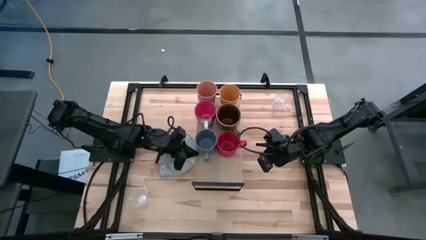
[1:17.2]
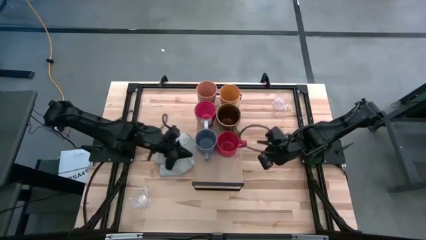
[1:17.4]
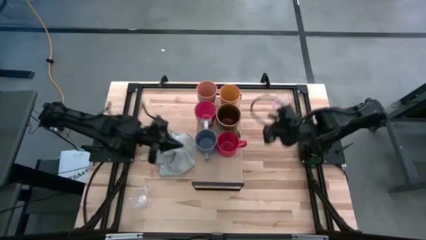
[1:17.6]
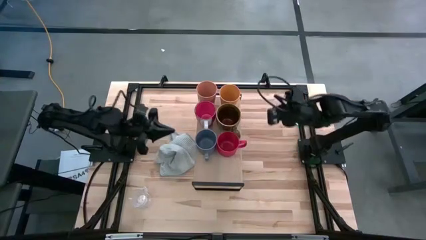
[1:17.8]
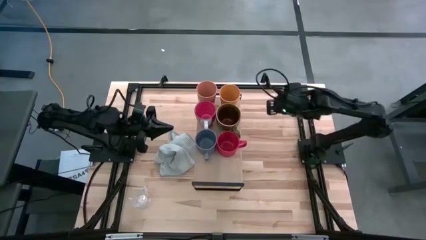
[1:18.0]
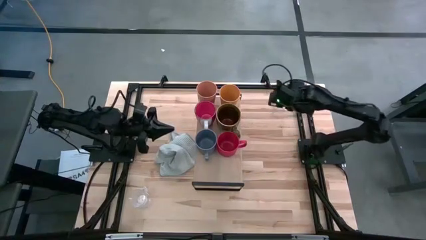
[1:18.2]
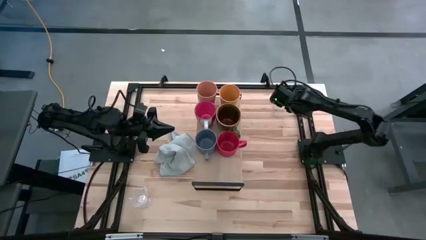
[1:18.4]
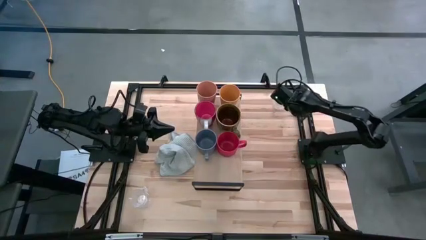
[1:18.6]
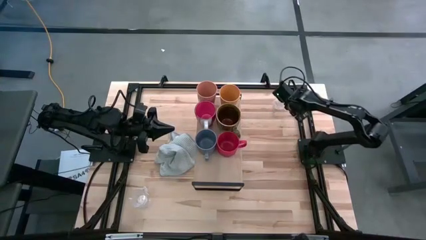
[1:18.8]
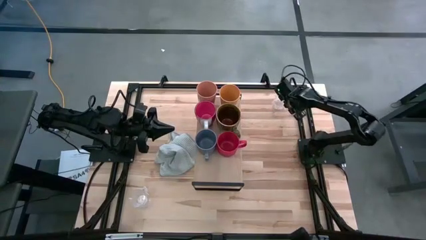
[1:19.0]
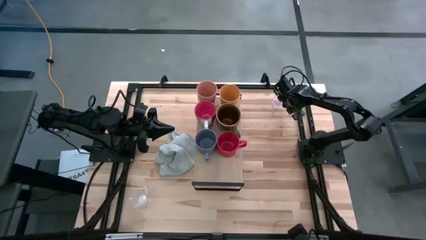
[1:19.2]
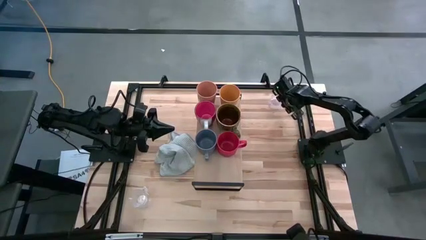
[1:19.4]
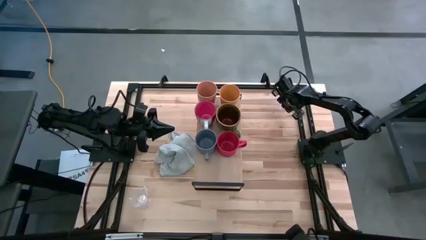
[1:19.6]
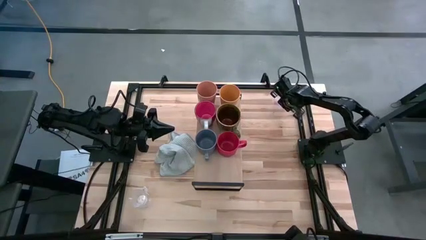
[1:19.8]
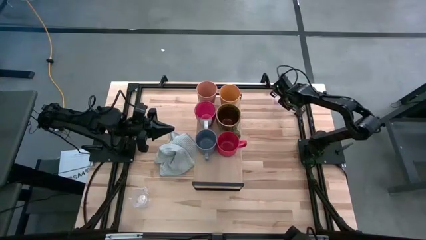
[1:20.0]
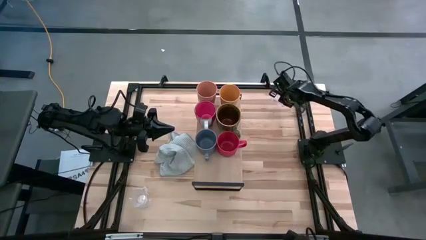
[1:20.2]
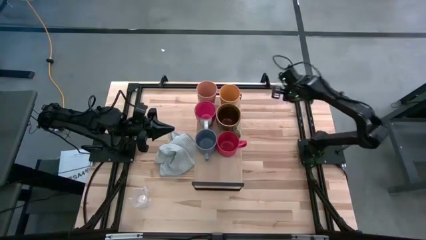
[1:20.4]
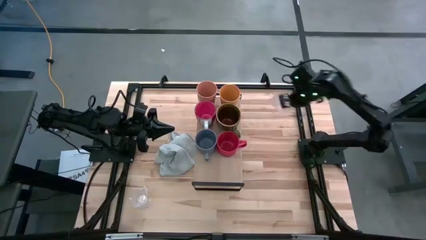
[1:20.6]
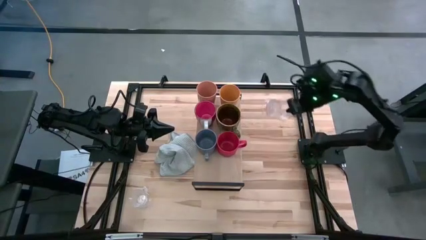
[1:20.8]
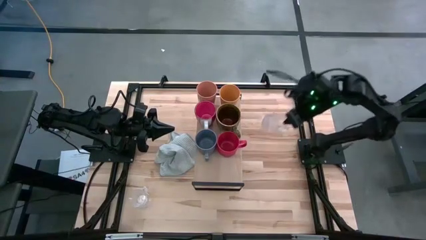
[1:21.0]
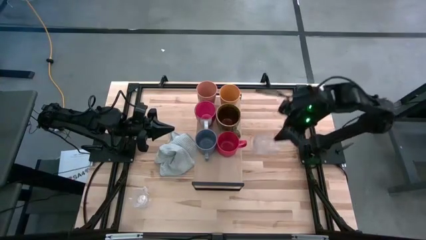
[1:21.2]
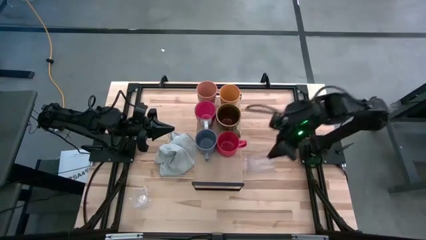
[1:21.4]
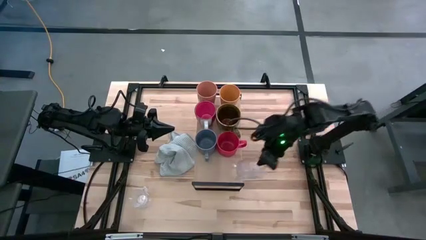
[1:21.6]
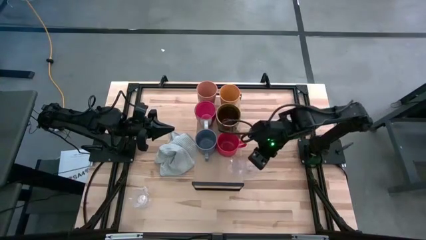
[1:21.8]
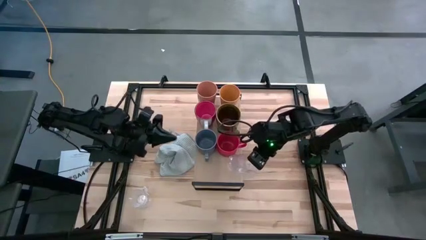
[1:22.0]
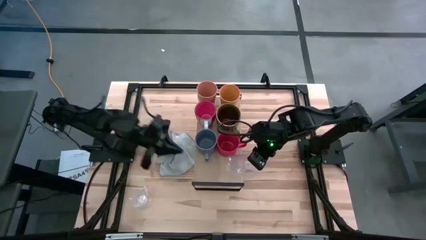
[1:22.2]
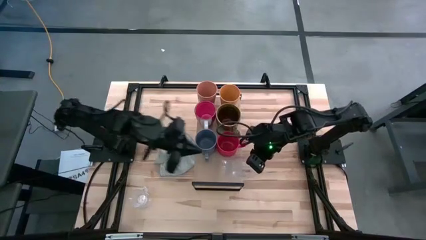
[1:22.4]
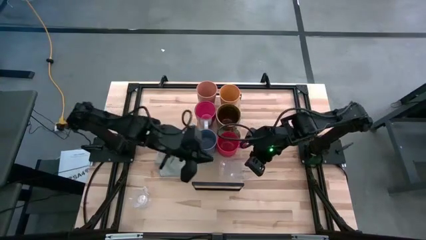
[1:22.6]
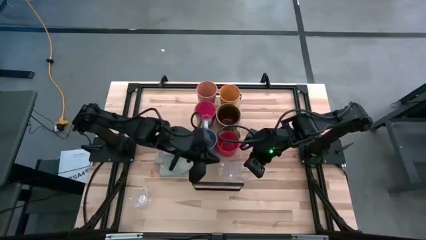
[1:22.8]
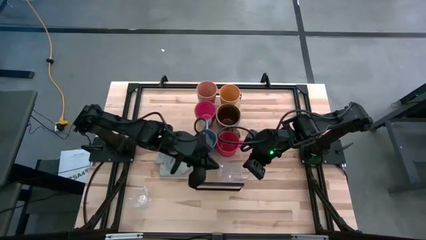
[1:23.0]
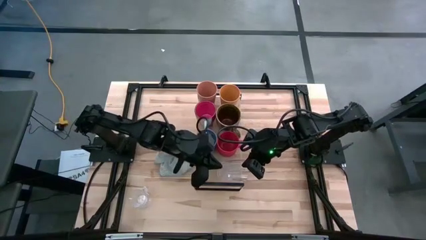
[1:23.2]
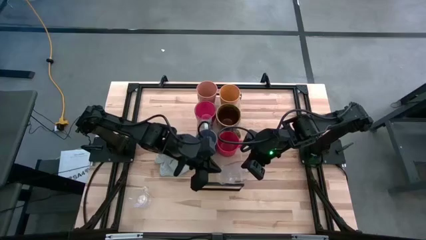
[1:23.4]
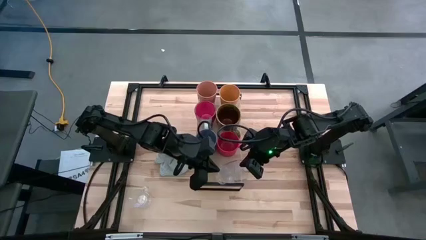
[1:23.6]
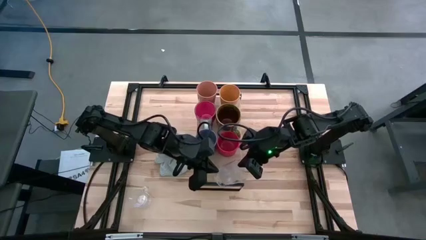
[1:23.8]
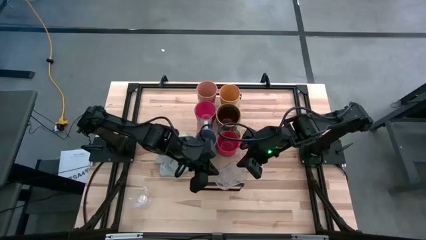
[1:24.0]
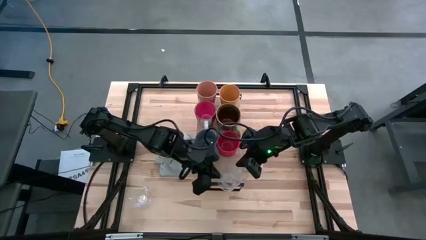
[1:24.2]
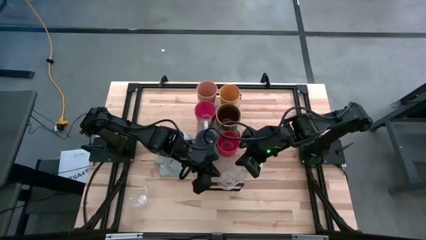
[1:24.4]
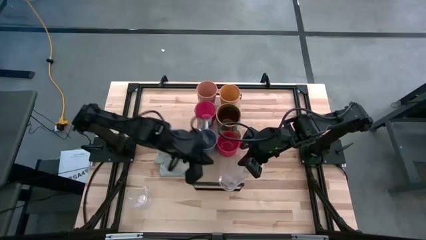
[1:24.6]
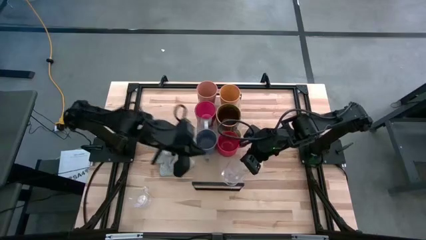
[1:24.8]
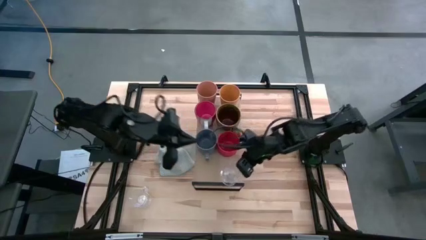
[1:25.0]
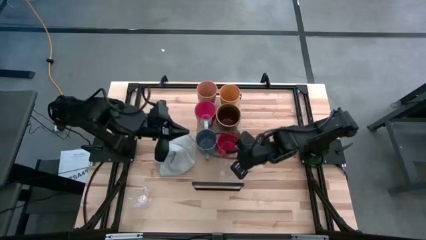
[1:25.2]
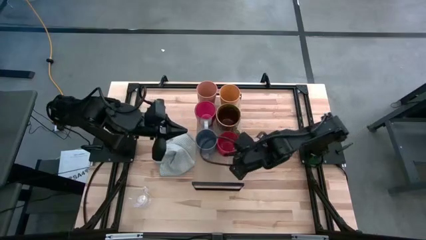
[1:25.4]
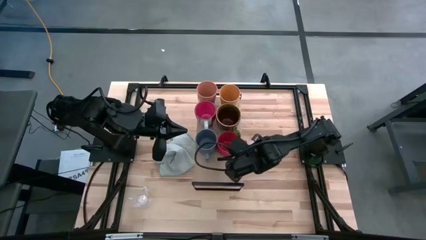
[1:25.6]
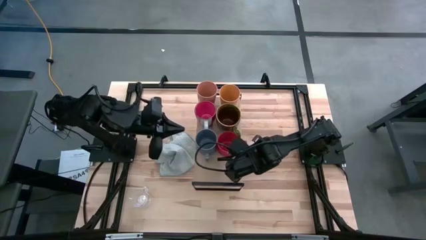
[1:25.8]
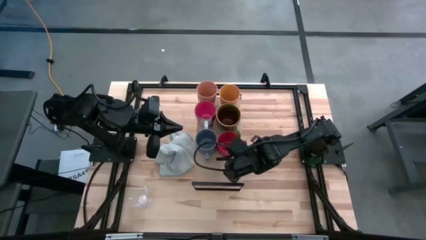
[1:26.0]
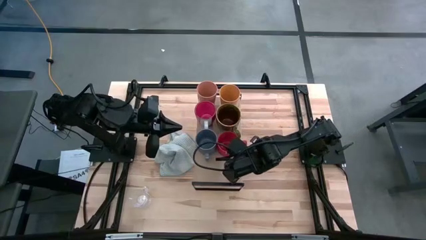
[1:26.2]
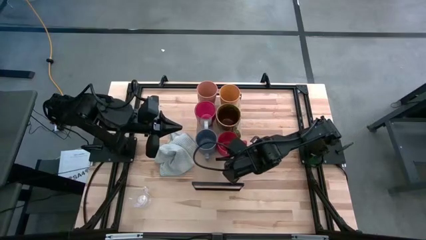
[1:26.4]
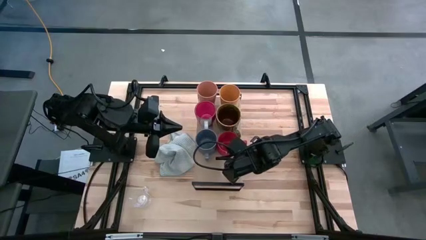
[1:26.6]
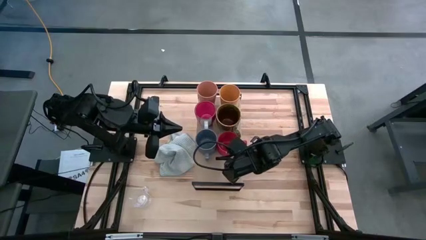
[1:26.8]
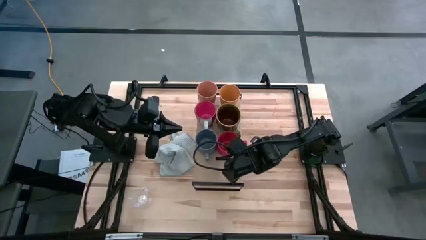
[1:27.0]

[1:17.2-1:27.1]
Task: Stack small to large cups/mugs on shelf
Put the top transparent mug on the shelf

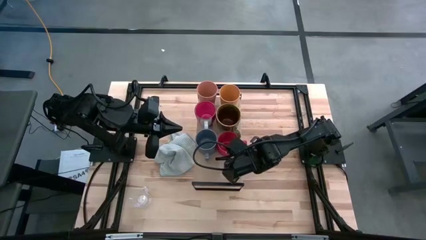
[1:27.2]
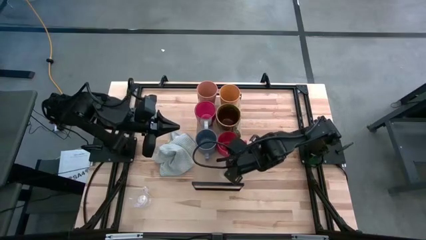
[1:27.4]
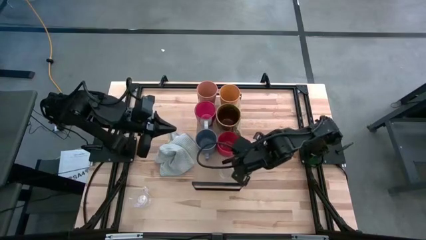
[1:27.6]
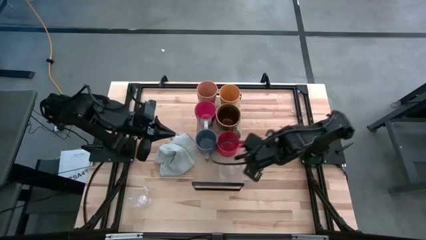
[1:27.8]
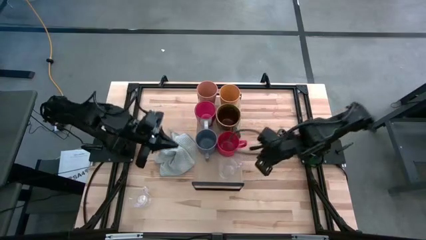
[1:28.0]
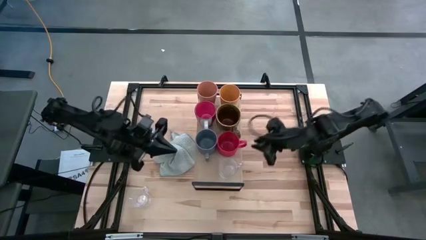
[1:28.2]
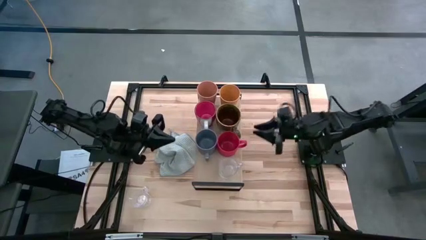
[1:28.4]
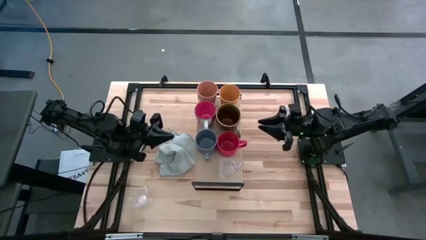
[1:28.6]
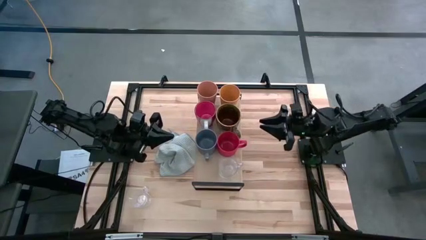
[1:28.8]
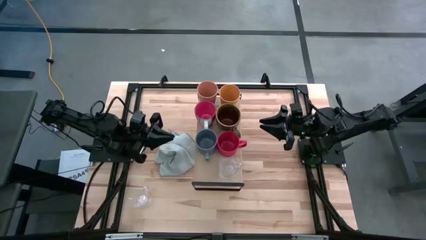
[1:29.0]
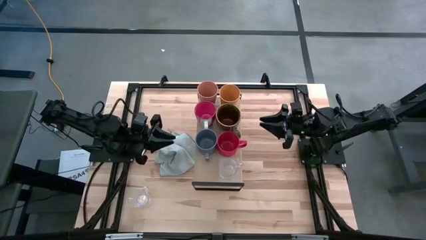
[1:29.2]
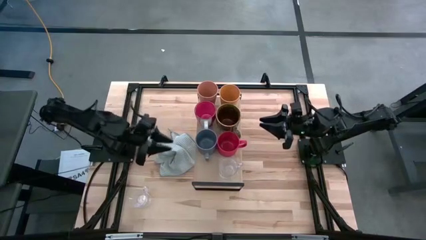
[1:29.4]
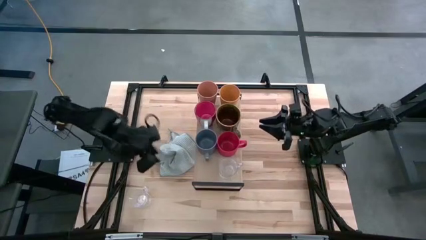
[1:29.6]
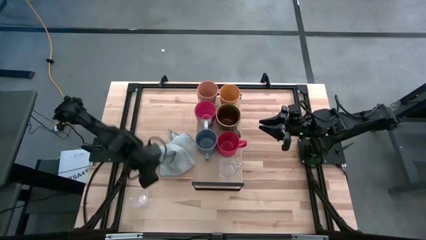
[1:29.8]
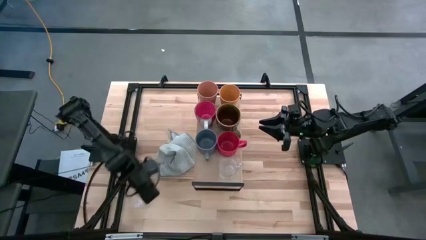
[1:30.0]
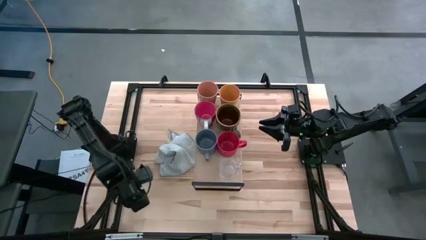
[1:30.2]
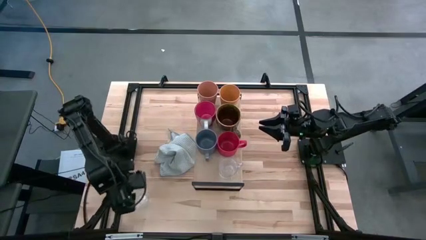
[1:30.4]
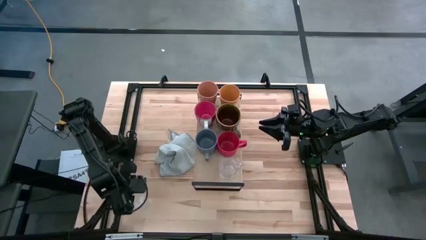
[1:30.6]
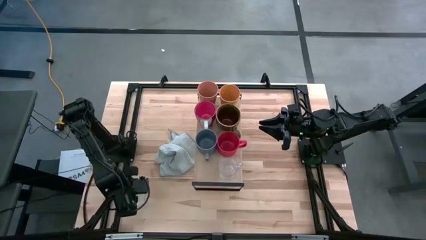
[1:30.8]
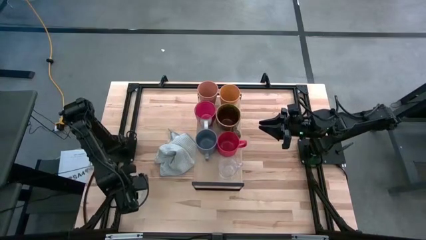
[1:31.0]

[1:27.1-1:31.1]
Put the transparent mug aligned with the other transparent mug on the shelf

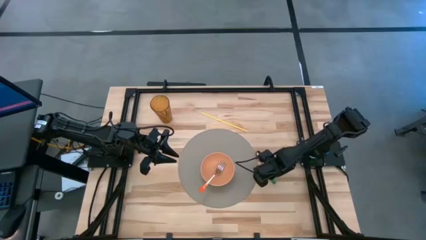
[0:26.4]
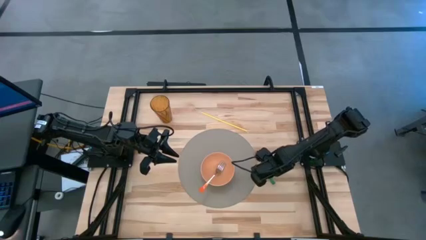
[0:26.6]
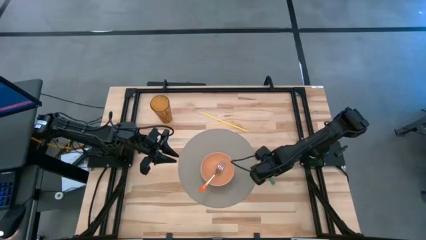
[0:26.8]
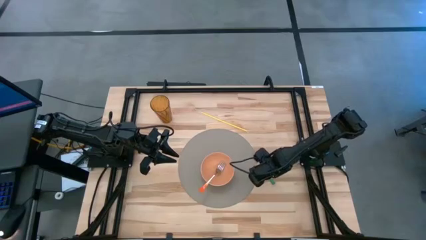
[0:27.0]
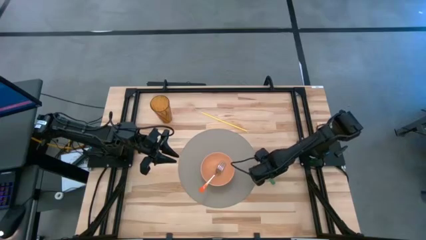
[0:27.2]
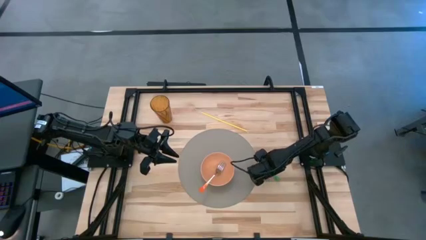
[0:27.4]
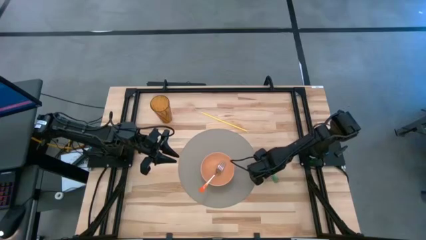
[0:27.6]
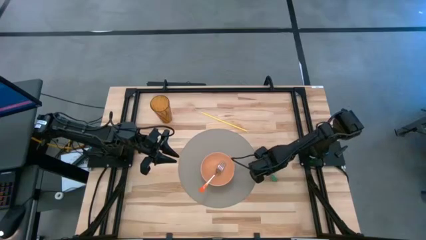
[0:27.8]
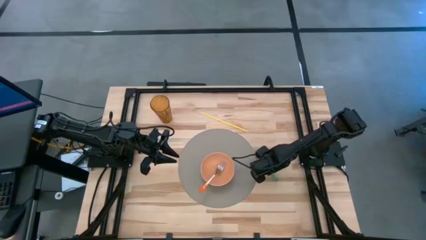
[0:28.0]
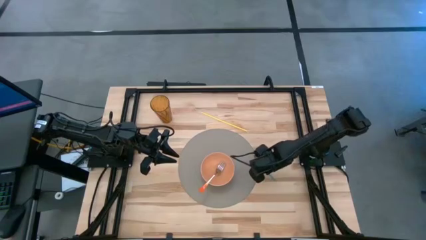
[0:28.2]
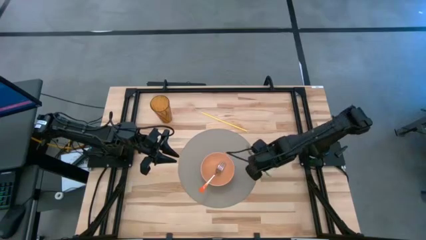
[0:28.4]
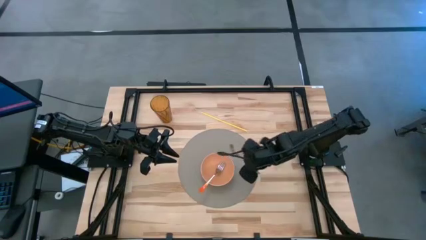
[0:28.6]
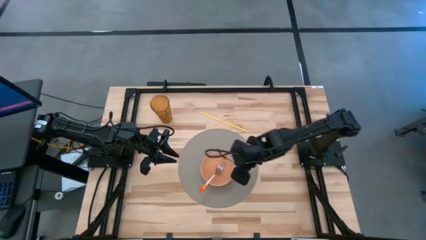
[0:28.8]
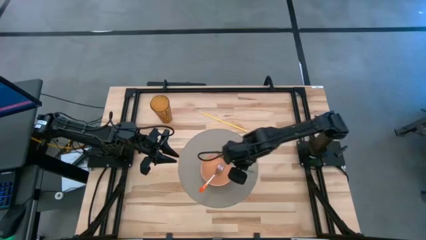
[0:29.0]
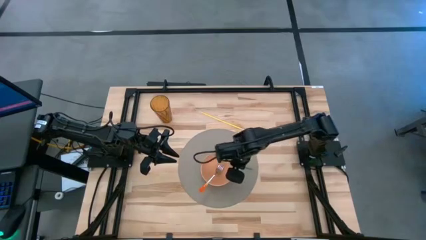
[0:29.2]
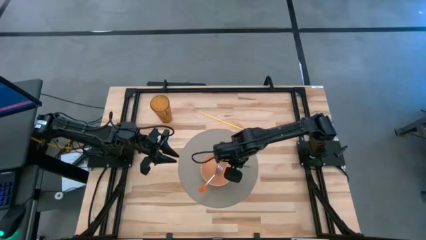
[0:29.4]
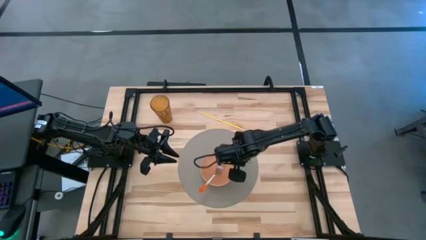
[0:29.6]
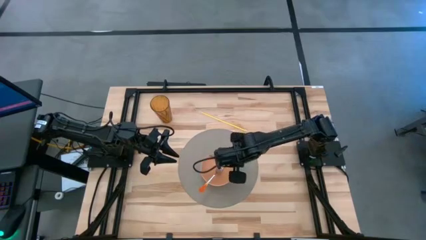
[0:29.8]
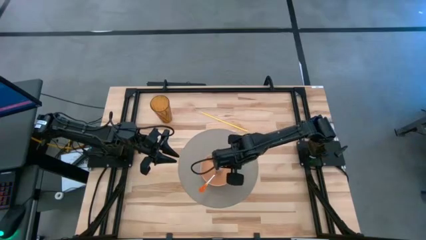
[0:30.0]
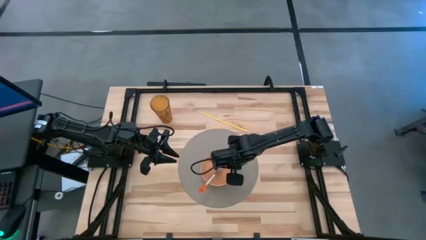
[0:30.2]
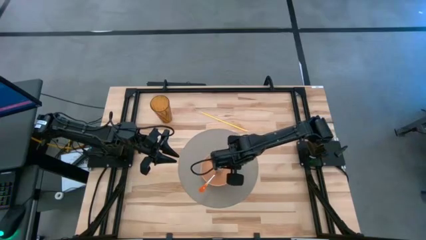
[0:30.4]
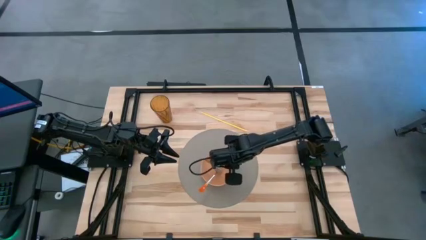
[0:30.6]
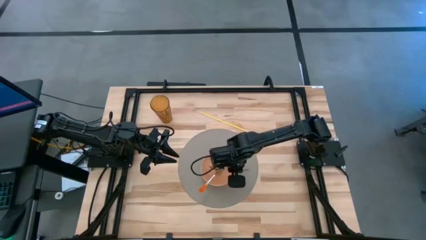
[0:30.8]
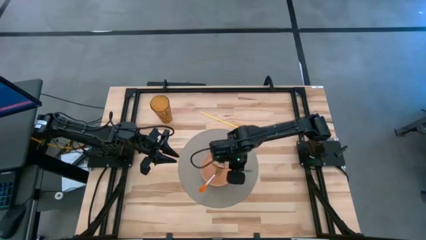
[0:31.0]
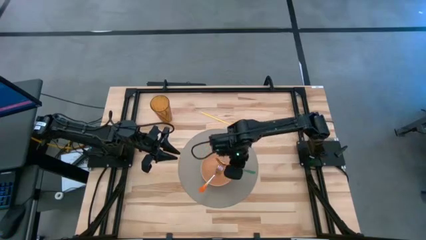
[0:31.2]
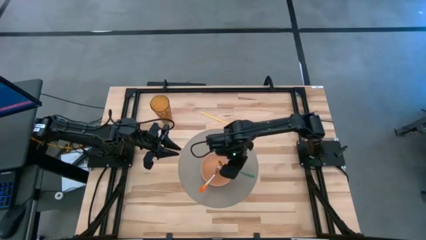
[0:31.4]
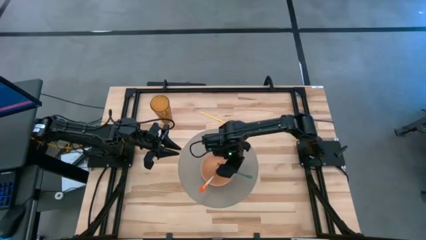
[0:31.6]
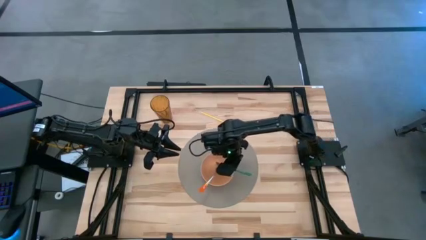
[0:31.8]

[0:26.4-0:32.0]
Task: Pick & Place Utensil
Put the green spoon into the orange bowl
